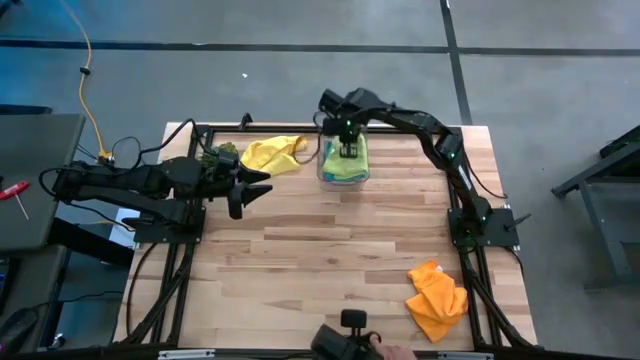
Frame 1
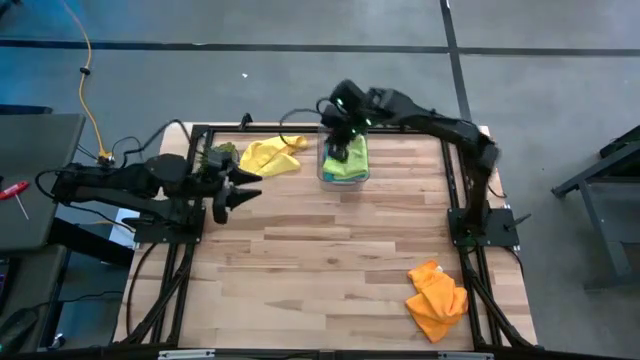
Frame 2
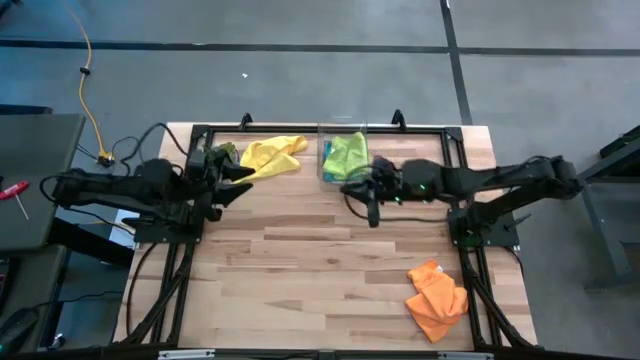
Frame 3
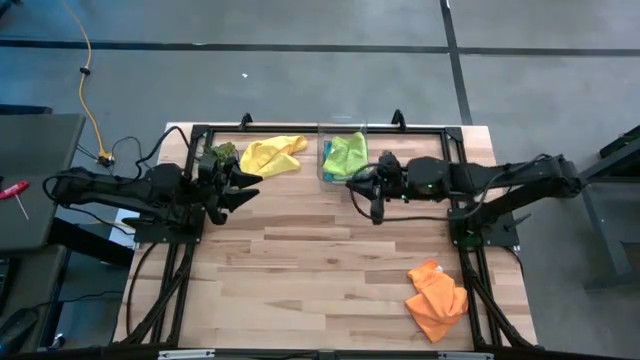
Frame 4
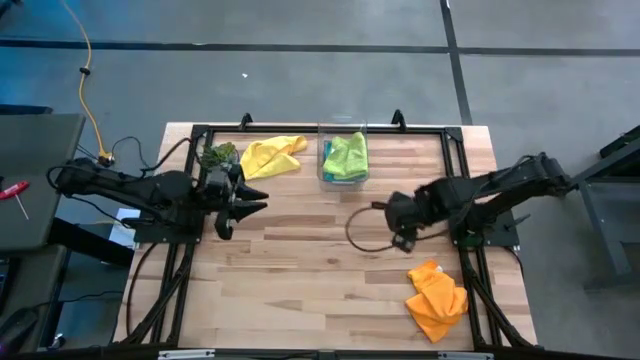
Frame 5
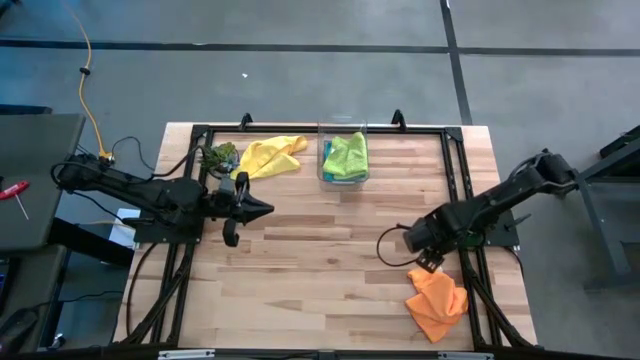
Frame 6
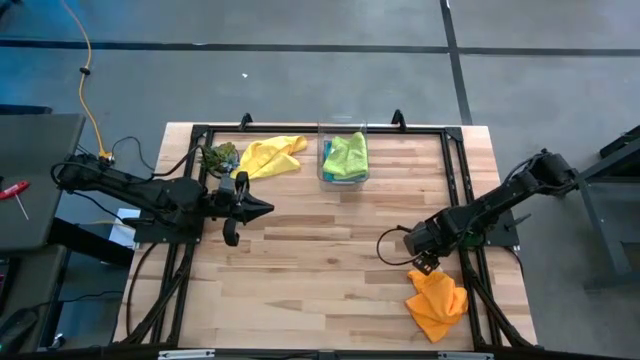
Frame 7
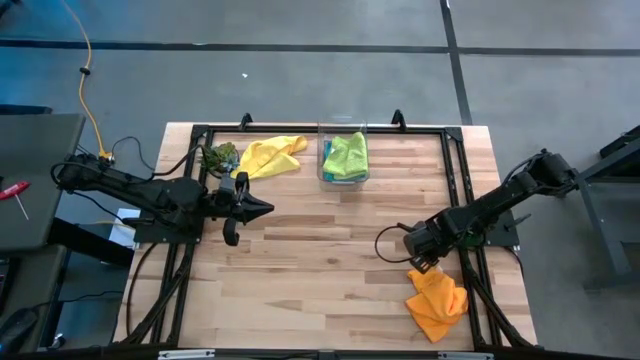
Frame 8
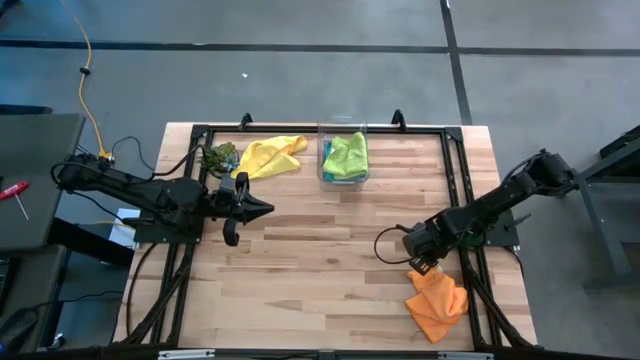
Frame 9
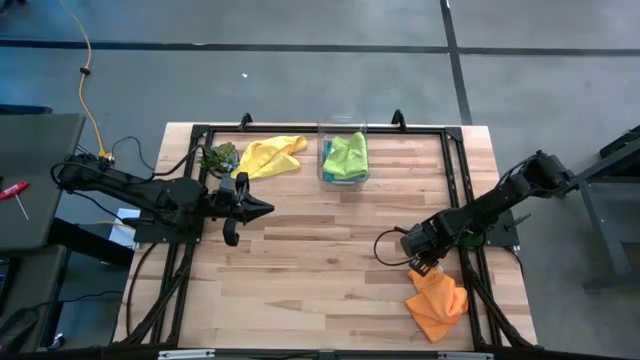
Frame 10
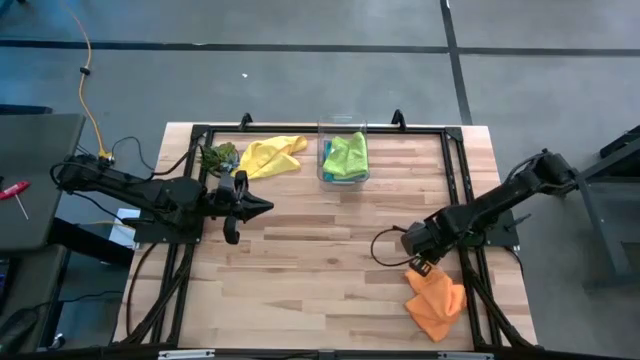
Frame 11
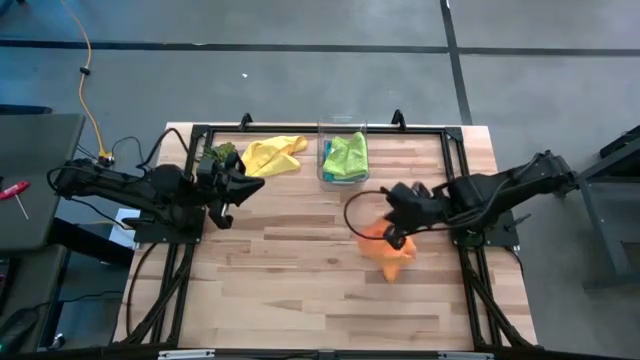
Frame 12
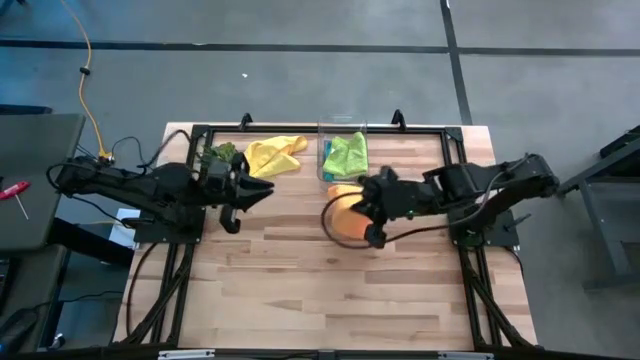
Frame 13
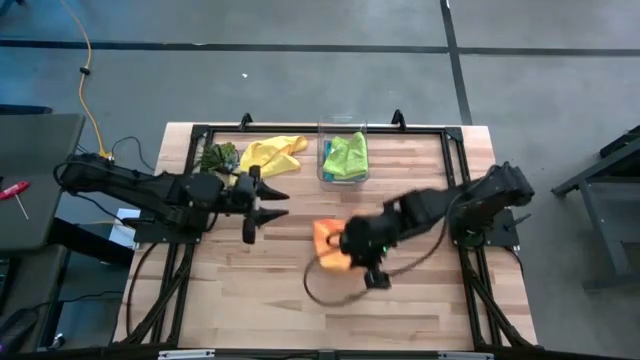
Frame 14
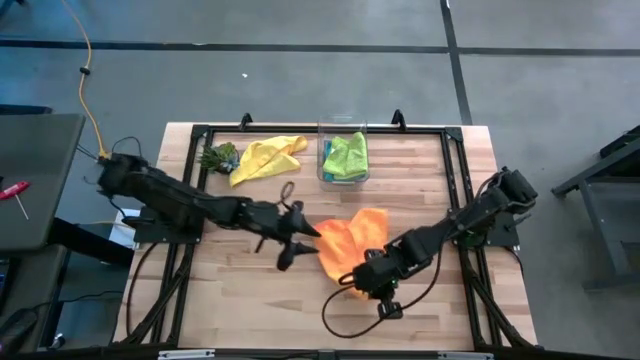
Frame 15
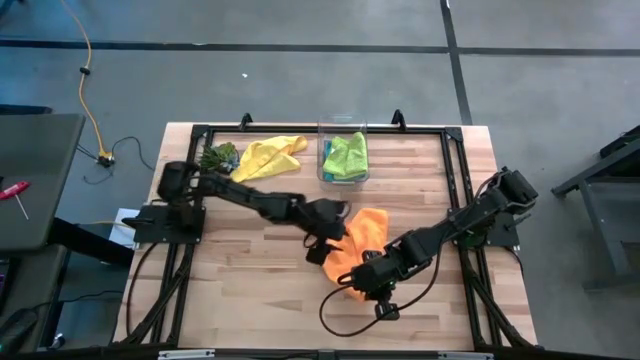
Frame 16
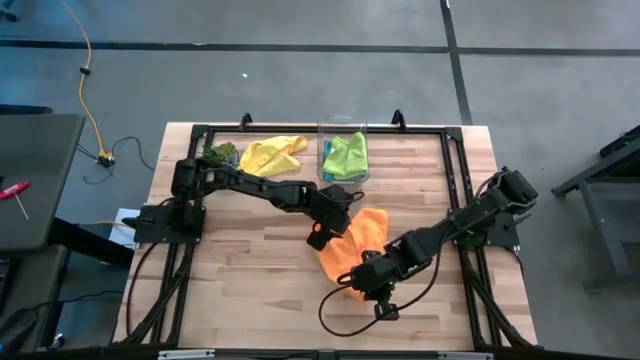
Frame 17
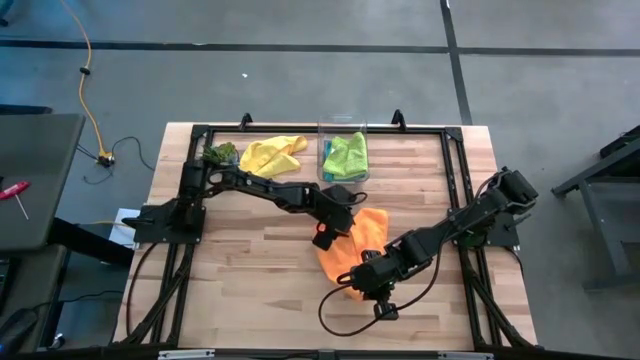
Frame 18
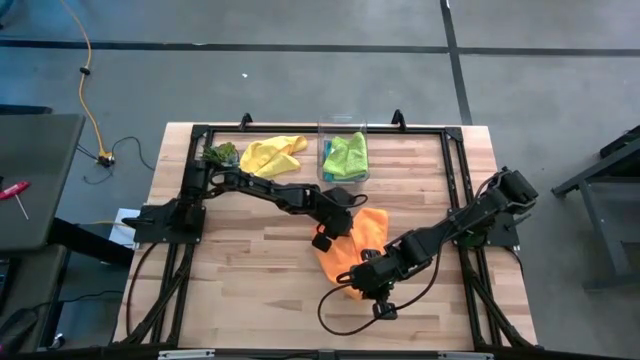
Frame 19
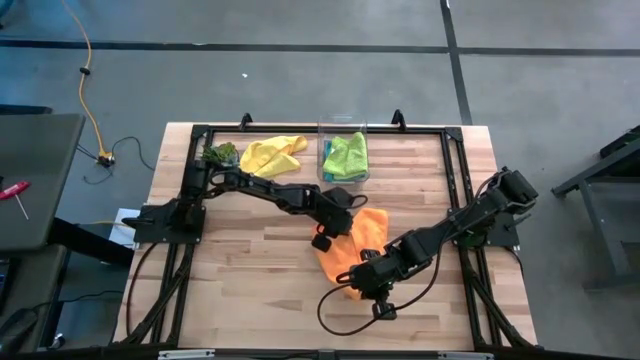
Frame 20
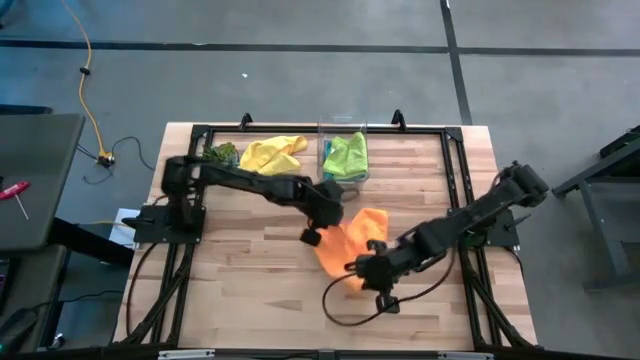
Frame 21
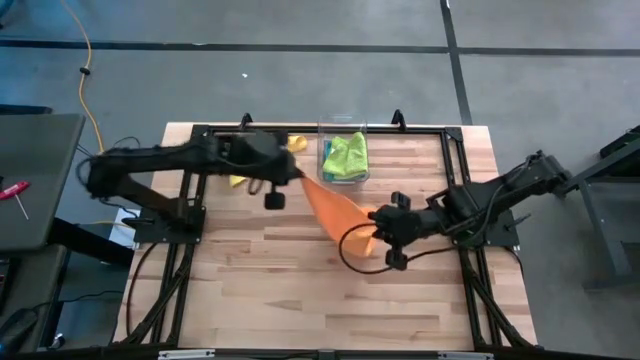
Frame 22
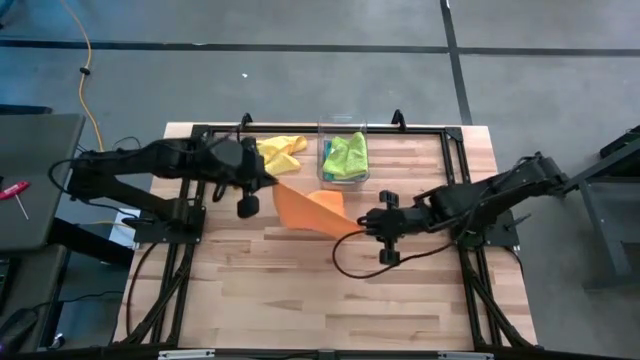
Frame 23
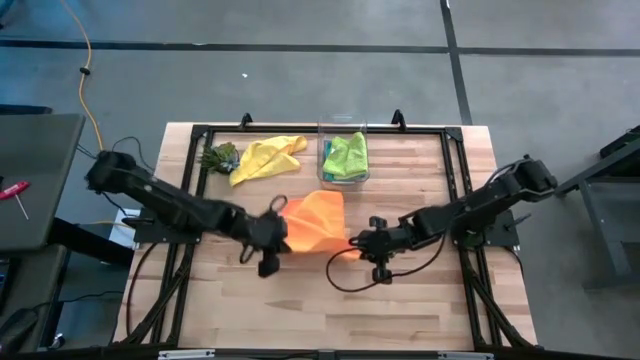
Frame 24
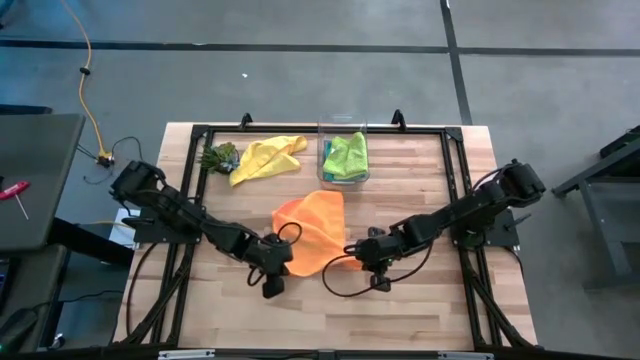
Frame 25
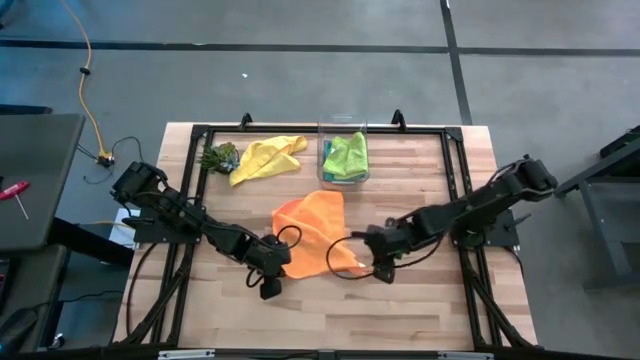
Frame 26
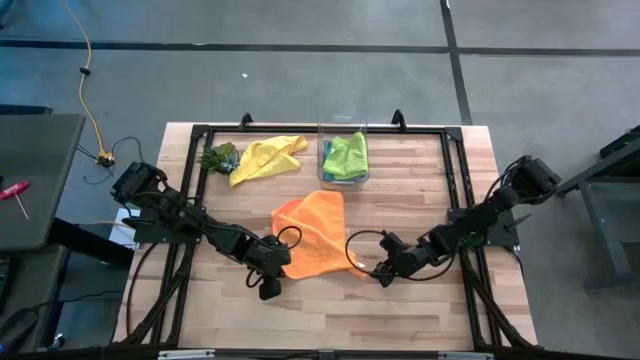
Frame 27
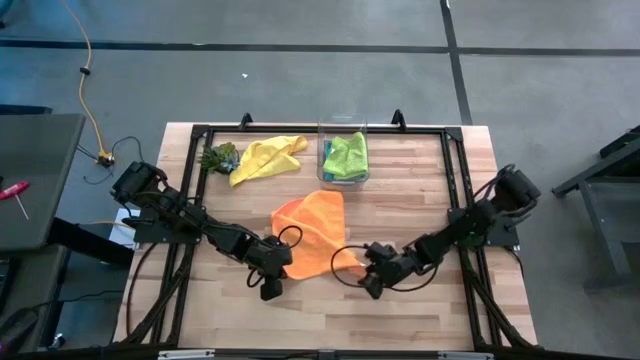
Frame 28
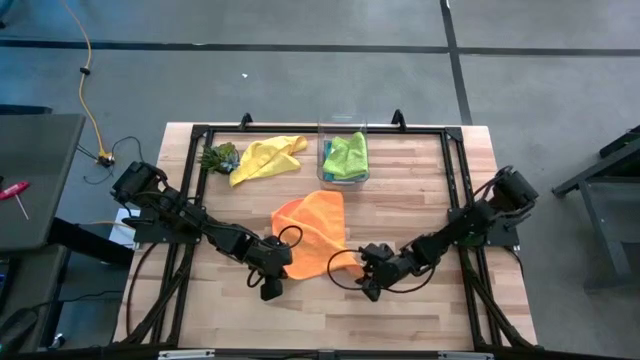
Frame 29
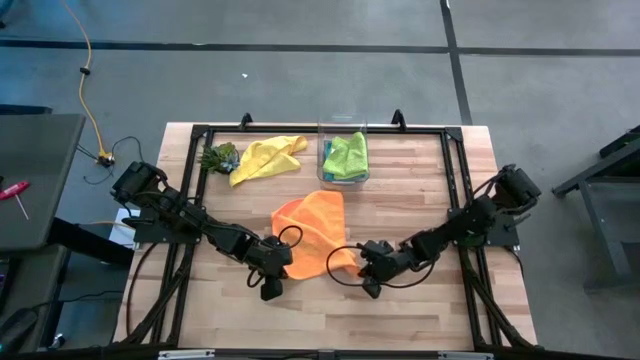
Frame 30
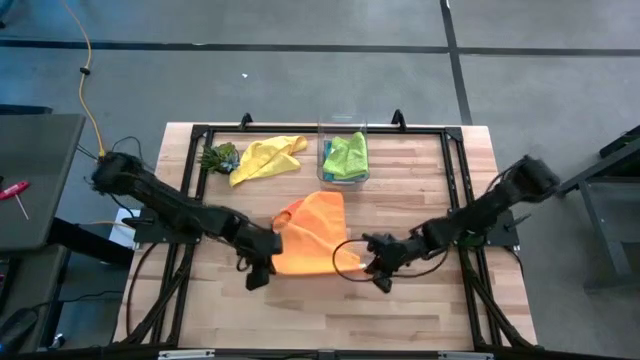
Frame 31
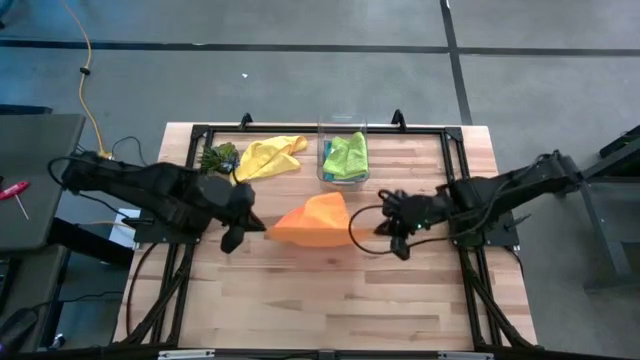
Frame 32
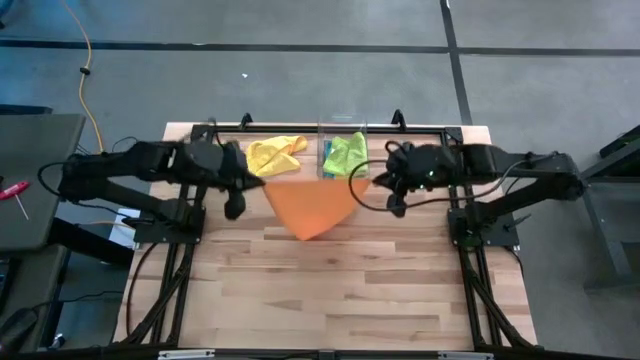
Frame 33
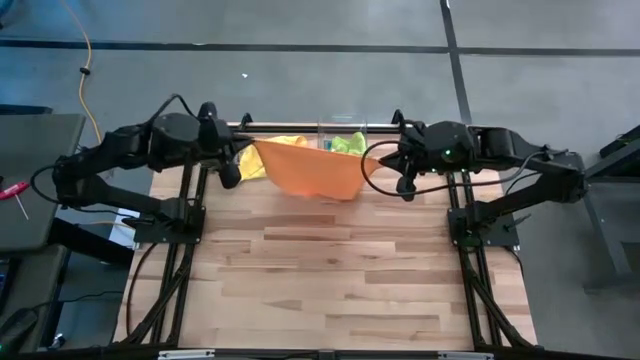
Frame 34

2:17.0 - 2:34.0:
Task: Fold microfiber towels
Fold the orange microfiber cloth

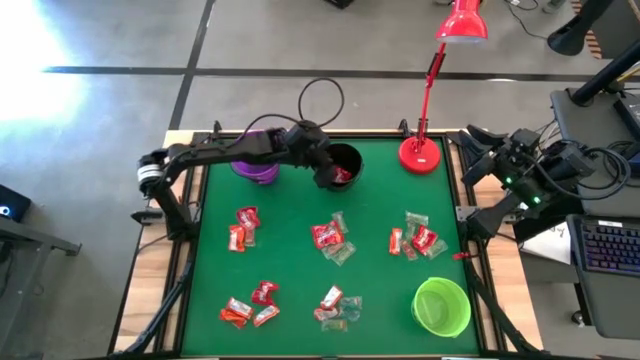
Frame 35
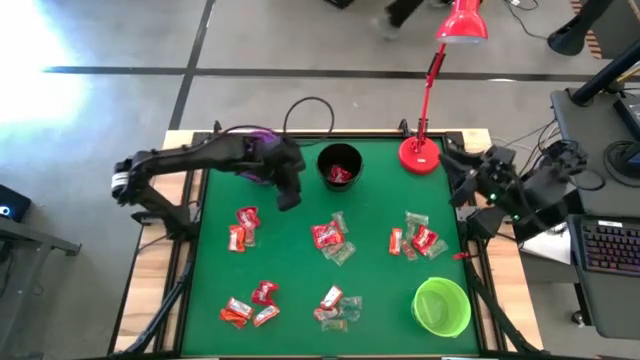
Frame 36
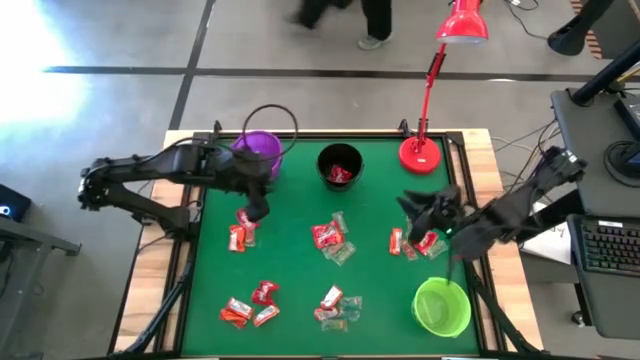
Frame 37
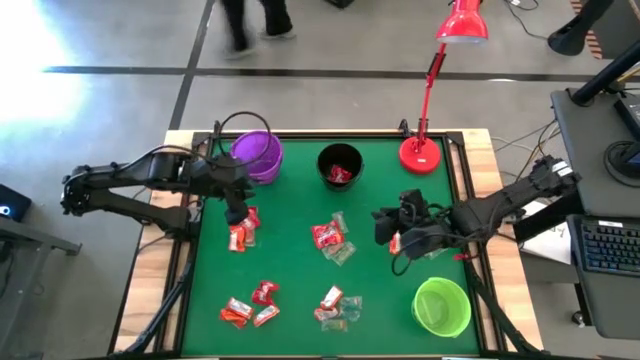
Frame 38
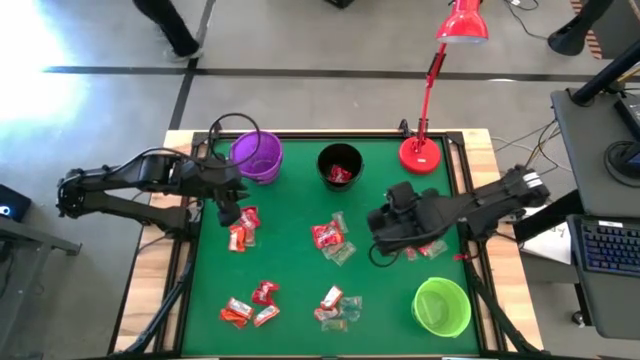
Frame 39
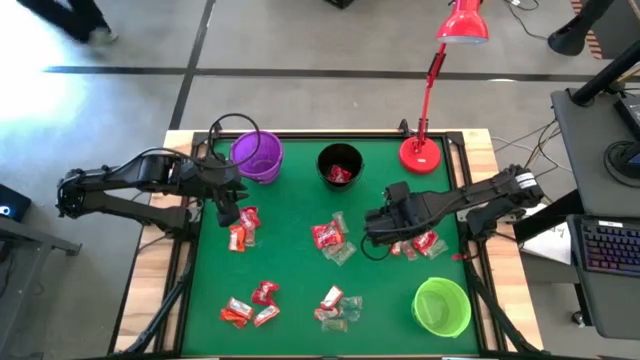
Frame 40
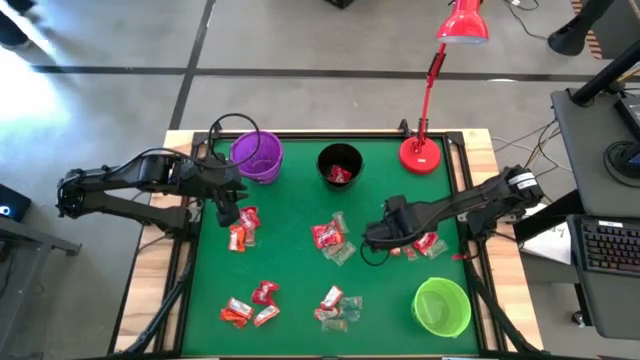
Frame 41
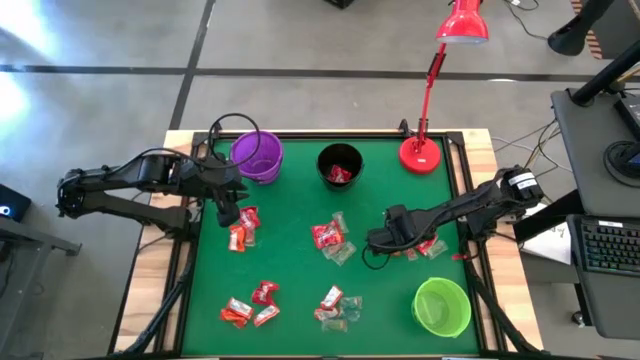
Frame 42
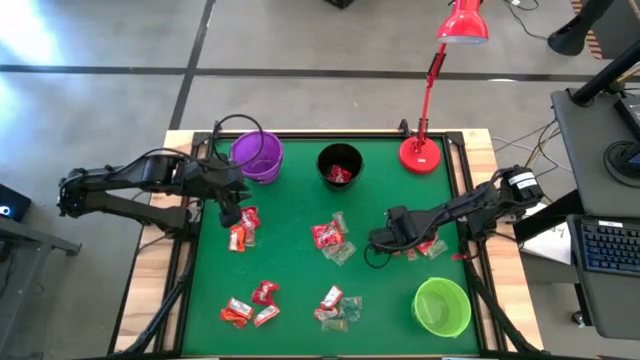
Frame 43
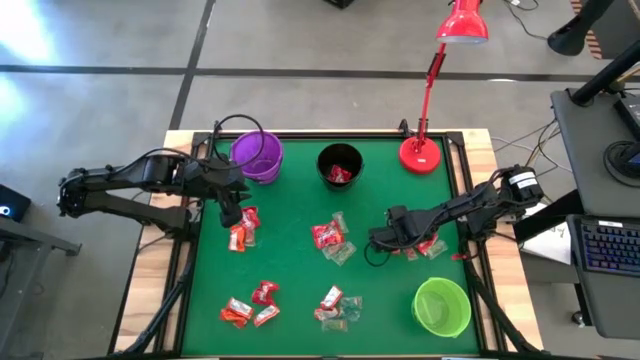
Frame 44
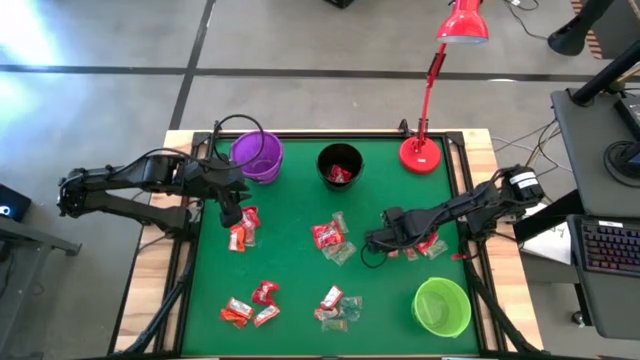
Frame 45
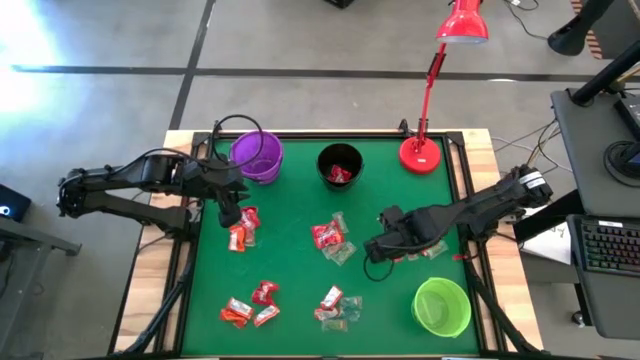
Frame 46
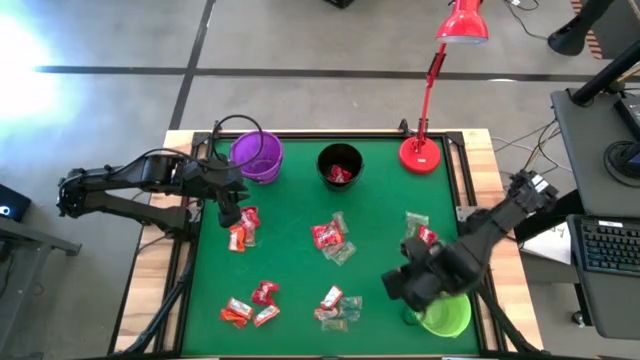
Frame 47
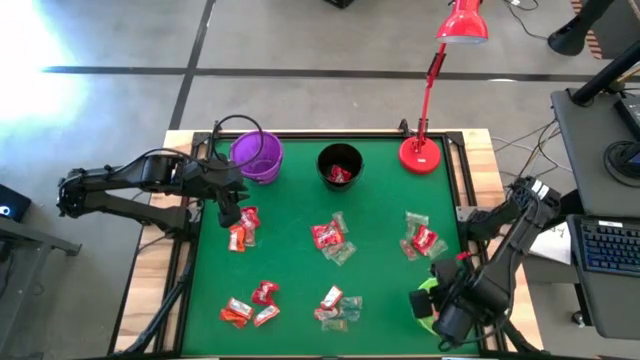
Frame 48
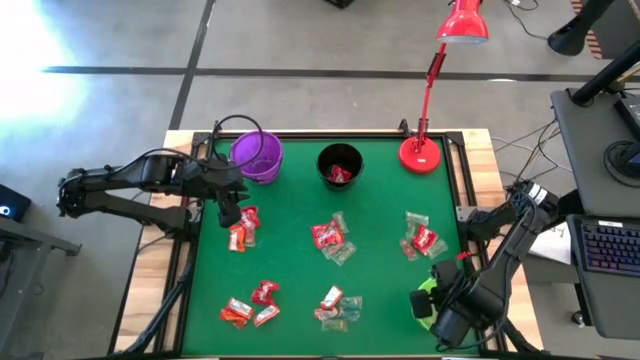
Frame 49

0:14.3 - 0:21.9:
Task: Sort candy
Put the orange chocolate into the green bucket
